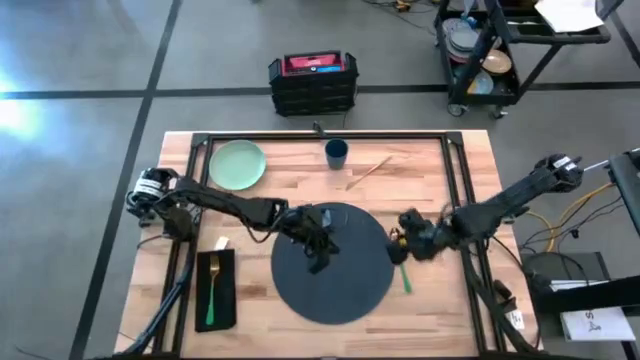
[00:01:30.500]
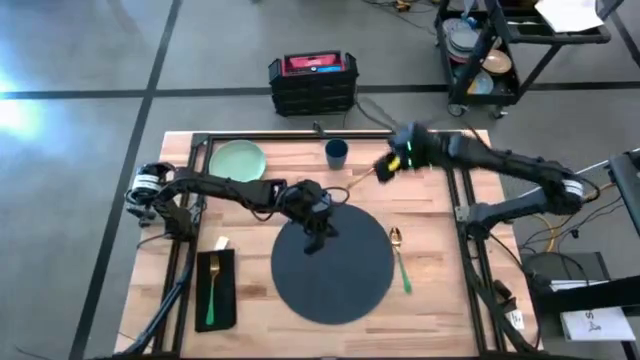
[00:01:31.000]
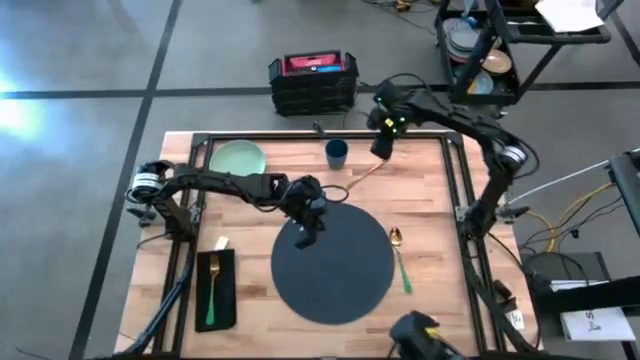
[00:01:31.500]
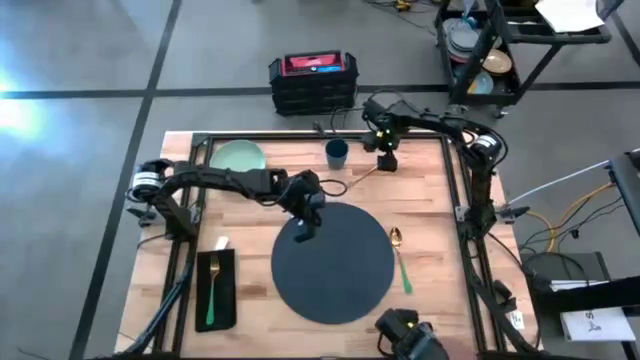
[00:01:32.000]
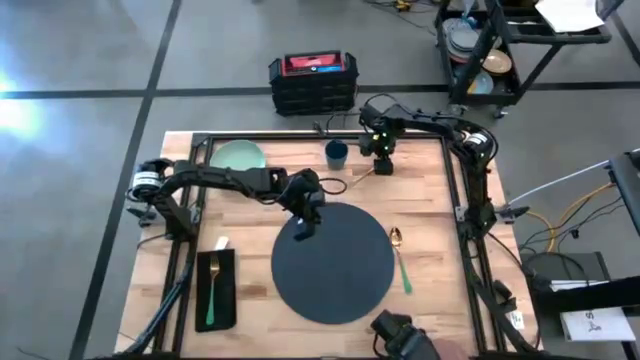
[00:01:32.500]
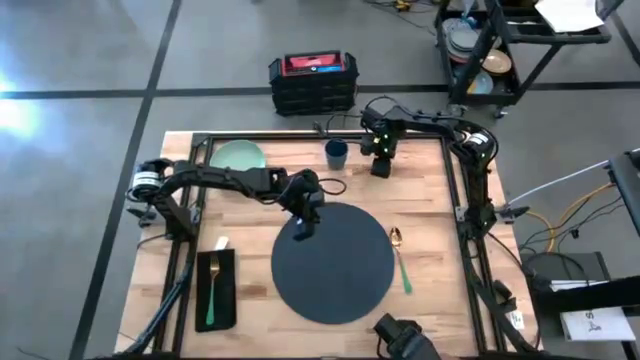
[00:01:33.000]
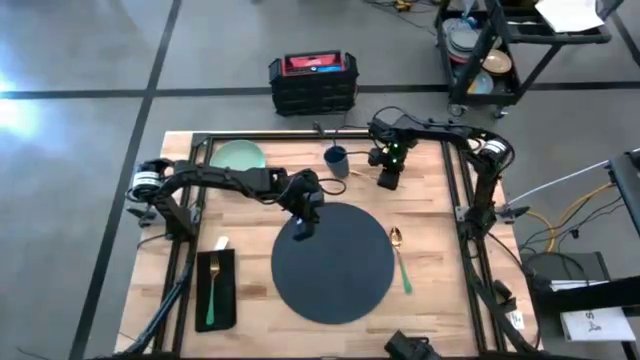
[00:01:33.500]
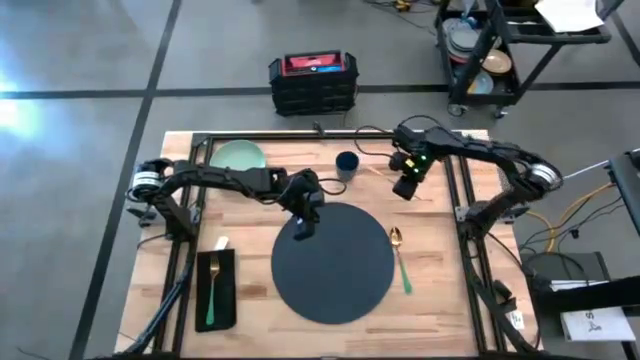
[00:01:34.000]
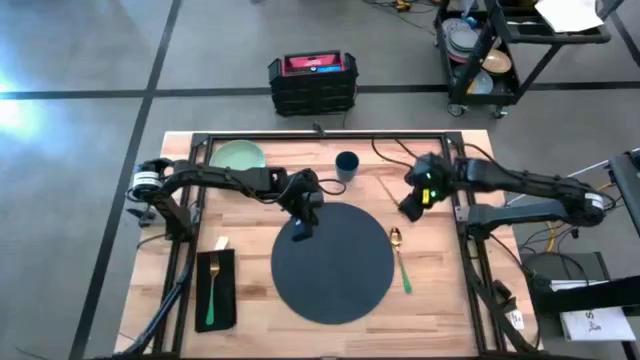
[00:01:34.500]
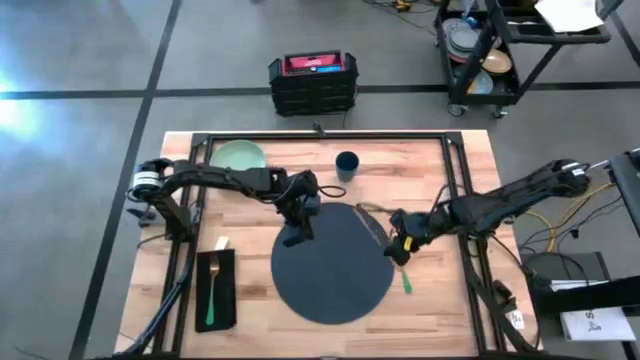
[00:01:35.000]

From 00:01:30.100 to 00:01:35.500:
Task: Set table place
Put the gold knife on the black placemat

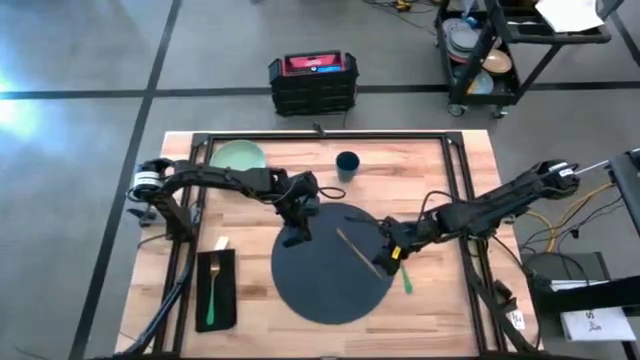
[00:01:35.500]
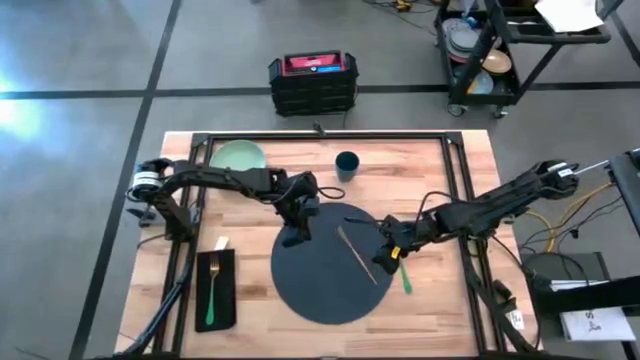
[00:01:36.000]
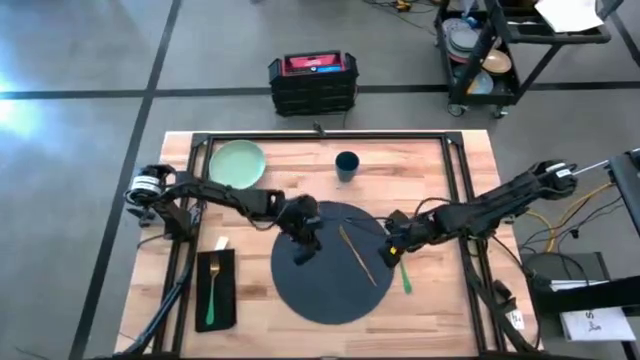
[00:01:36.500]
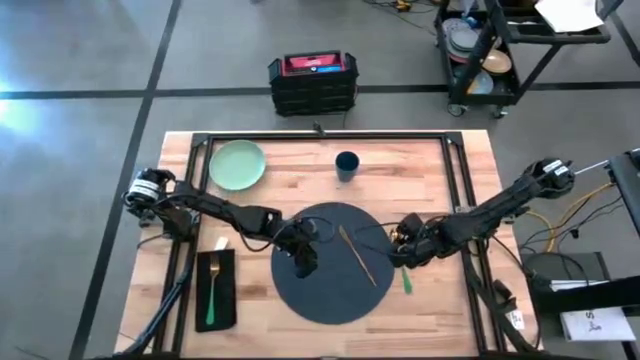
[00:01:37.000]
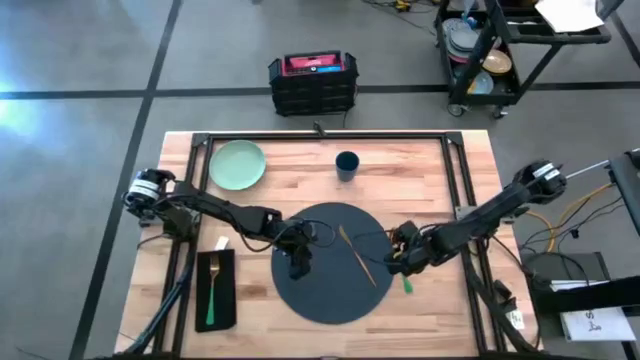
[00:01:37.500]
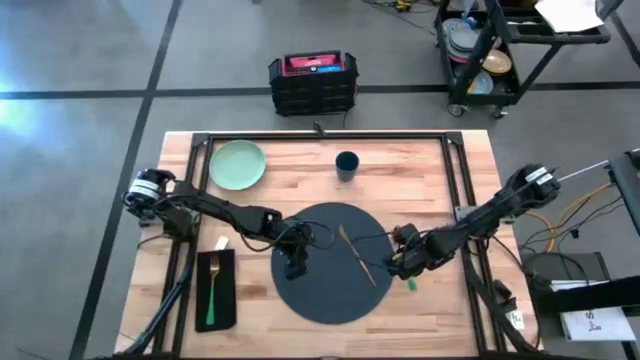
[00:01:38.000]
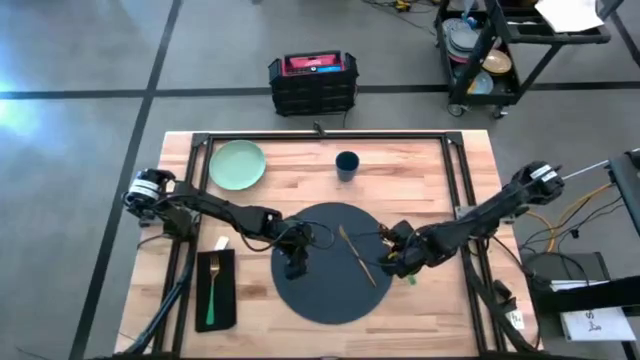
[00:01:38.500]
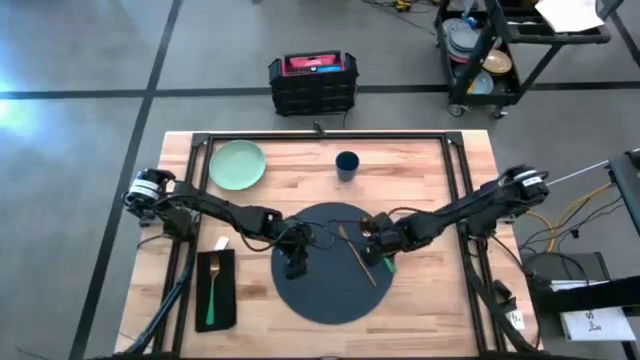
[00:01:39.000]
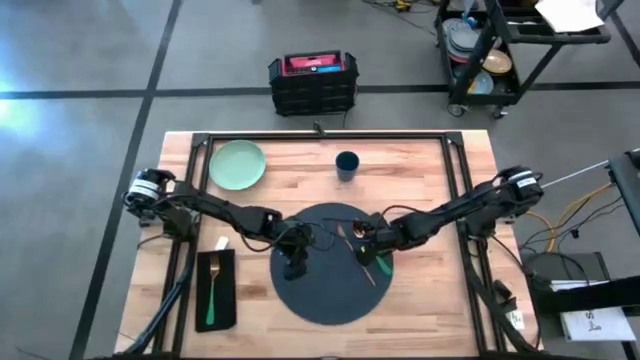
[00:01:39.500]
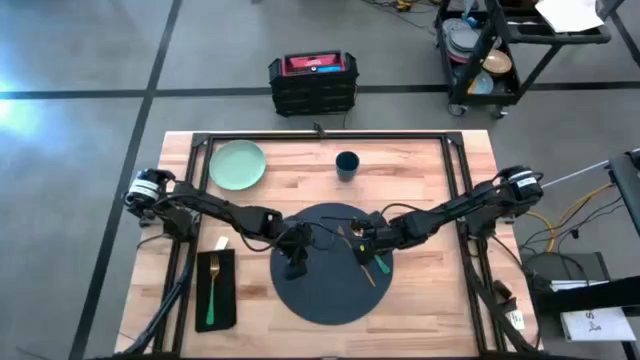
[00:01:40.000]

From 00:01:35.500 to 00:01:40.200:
Put the green spoon on the black placemat to the right of the gold knife

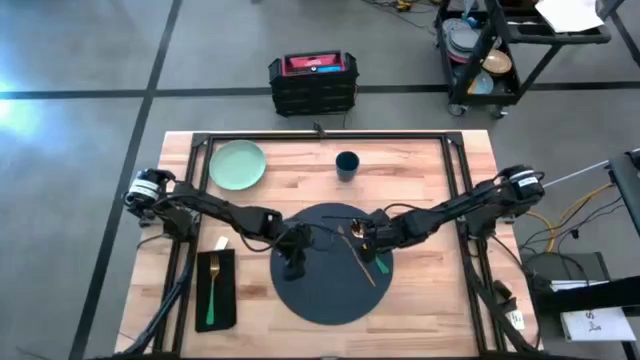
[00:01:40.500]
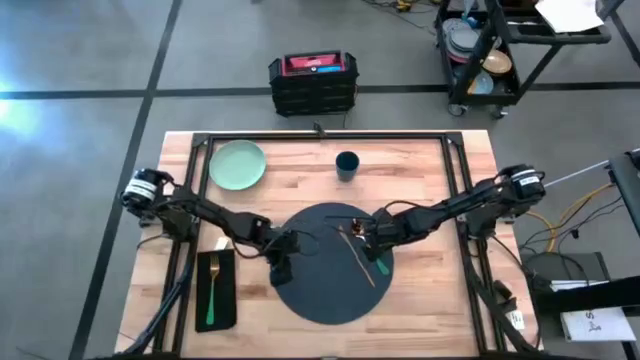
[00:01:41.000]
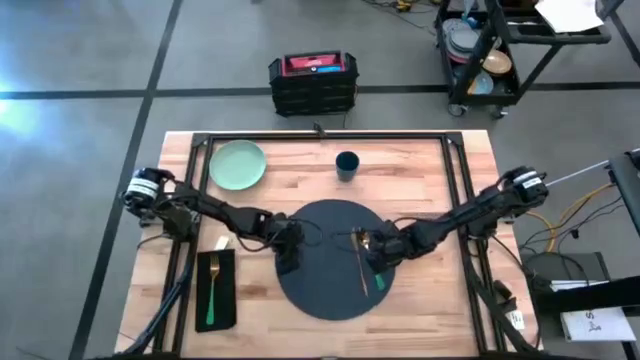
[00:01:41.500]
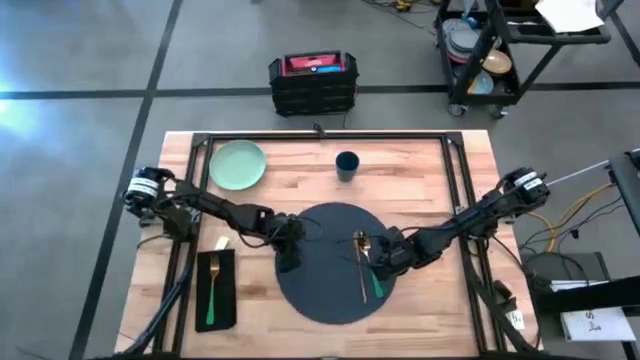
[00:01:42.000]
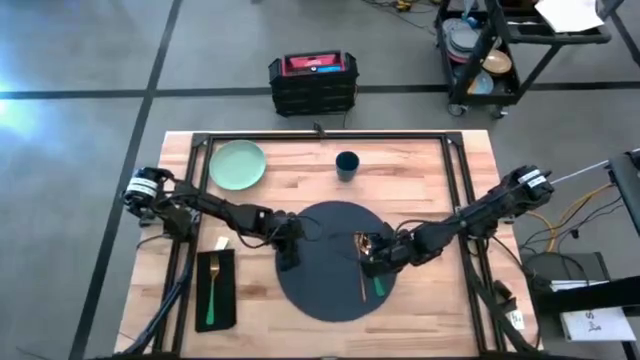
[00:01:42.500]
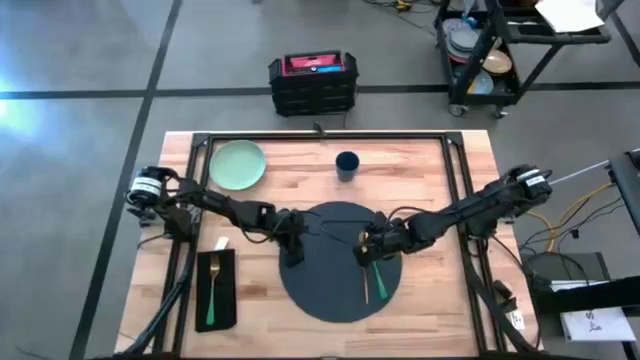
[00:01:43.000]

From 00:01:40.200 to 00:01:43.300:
Adjust the black placemat

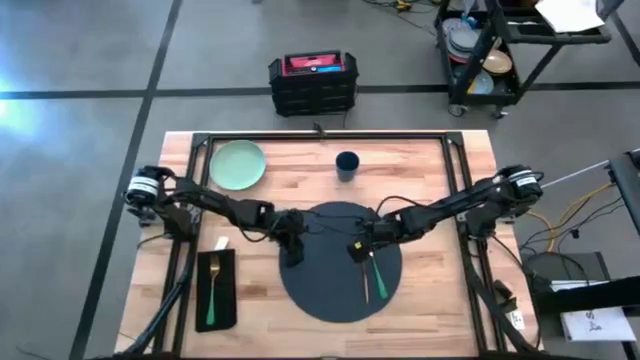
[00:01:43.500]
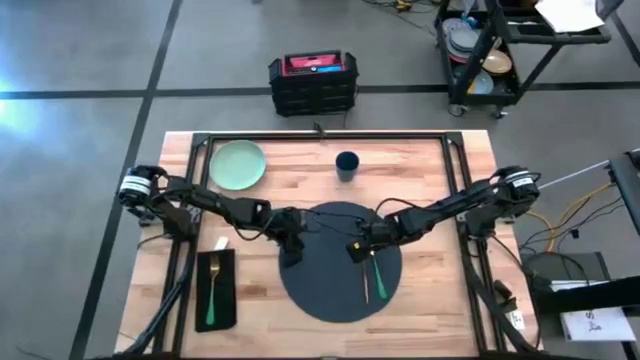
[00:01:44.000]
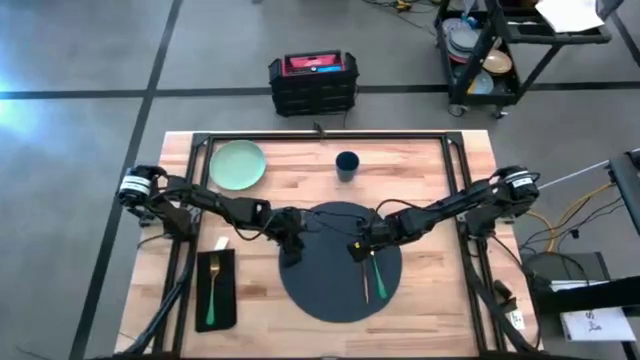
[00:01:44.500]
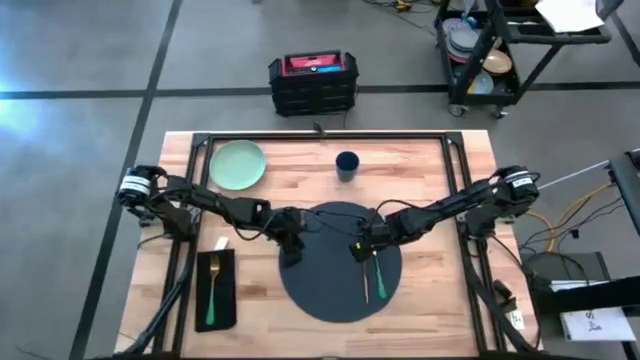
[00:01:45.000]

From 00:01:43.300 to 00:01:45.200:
Adjust the green spoon on the black placemat

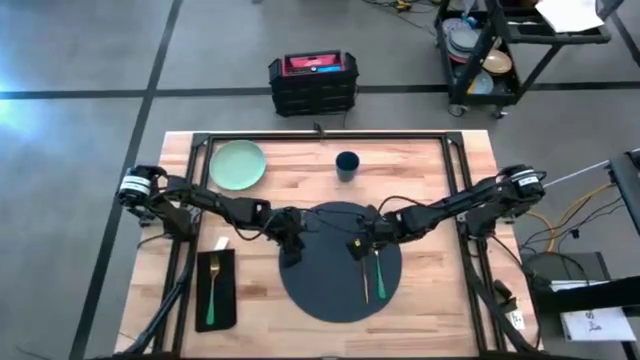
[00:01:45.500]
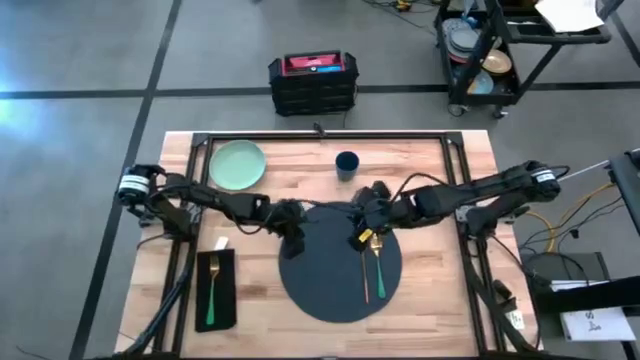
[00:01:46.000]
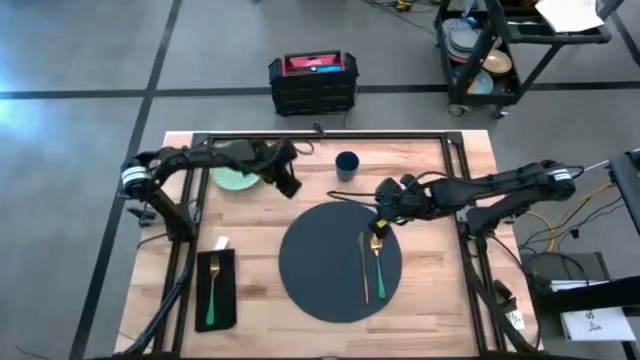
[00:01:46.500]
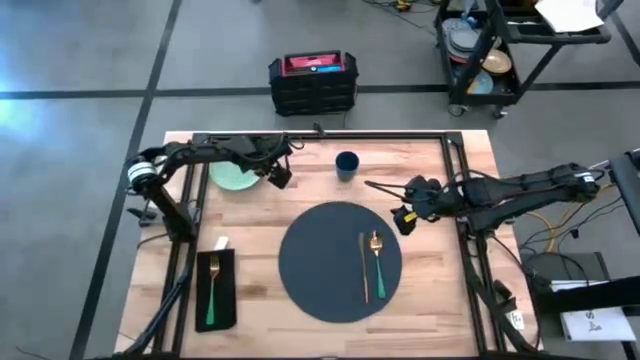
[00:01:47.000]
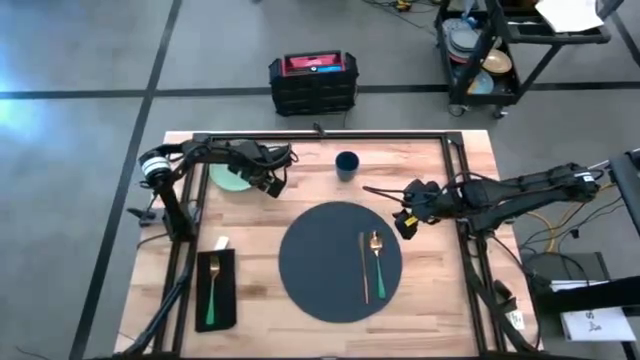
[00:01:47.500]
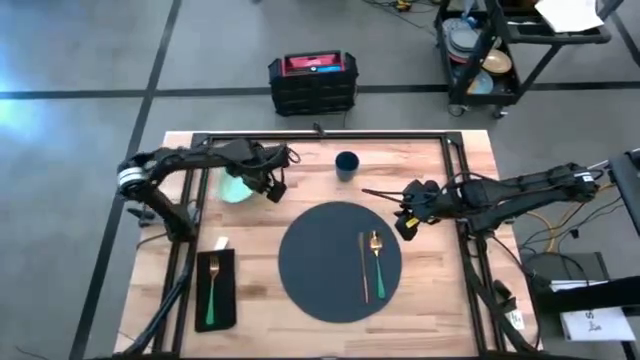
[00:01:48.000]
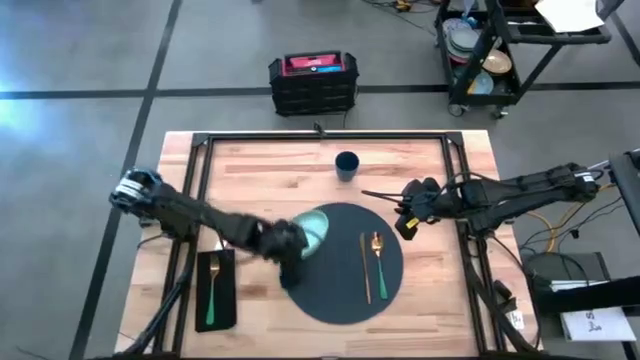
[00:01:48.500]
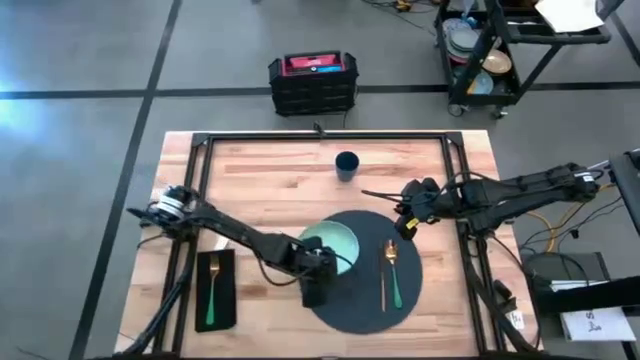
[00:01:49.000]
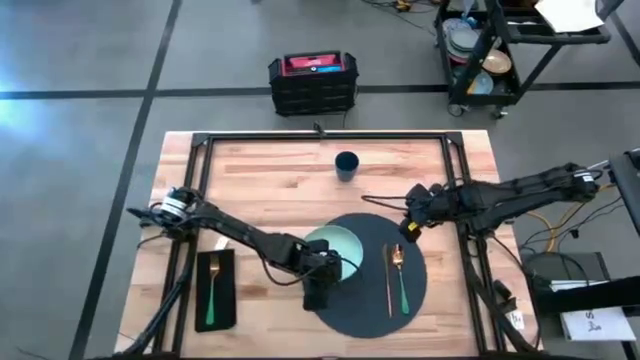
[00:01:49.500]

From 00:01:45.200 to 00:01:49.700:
Put the green plate on the black placemat

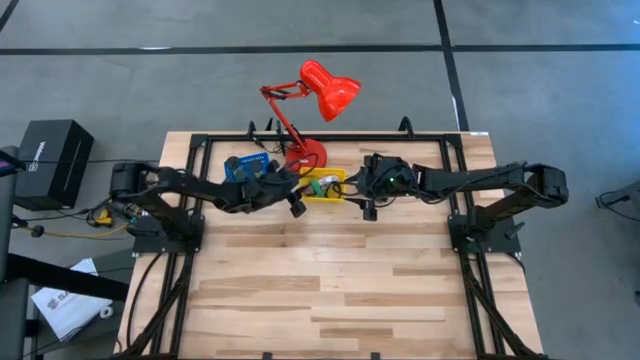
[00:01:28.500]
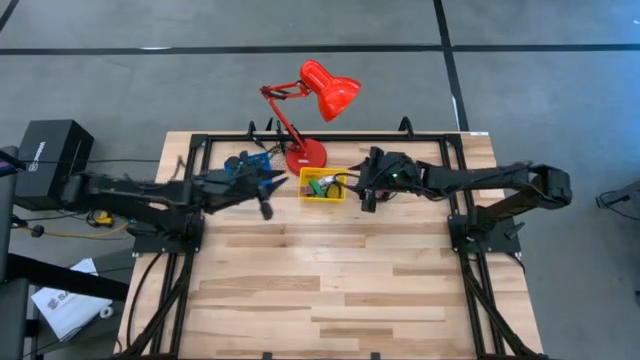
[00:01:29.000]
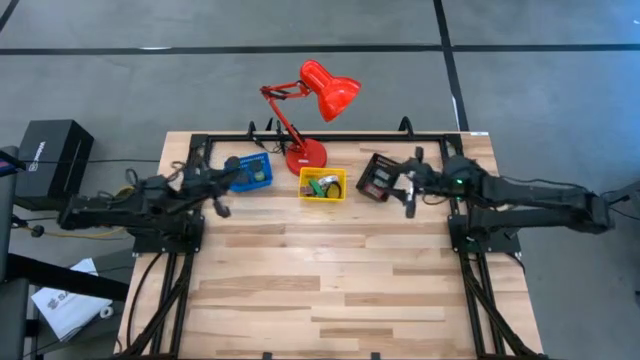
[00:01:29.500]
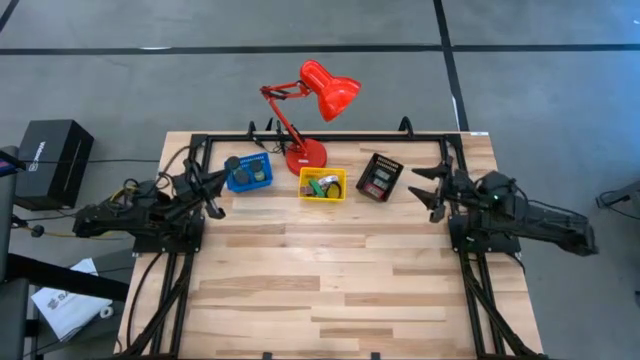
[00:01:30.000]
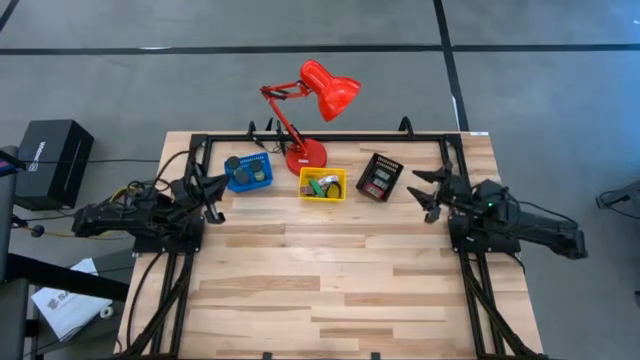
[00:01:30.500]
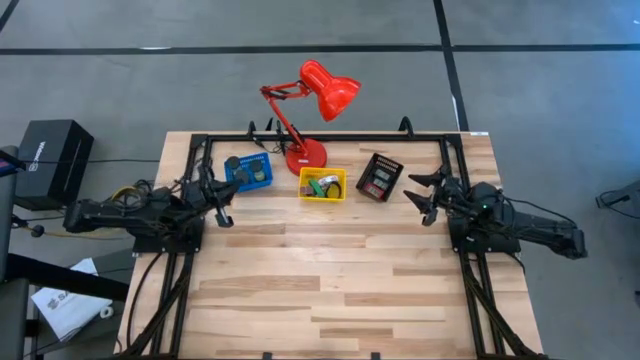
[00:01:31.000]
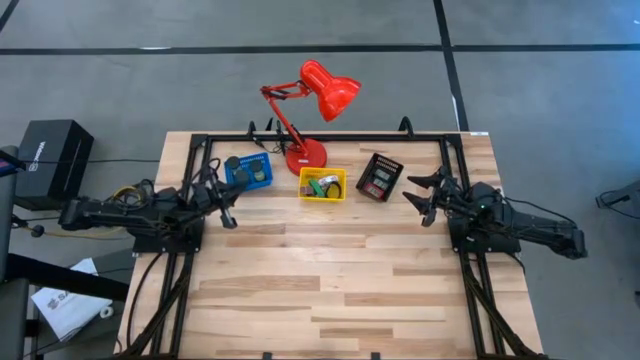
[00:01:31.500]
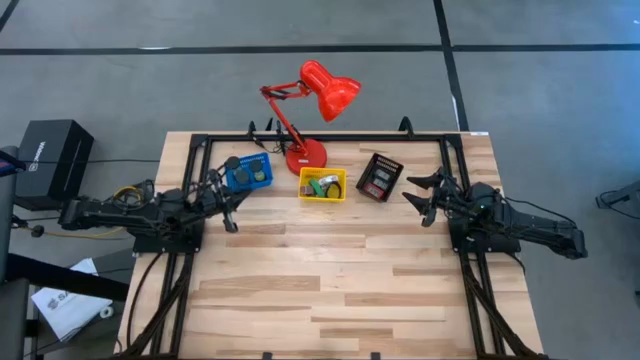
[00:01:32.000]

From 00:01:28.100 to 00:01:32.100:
Task: Pick & Place Office items
Return to Home Position
